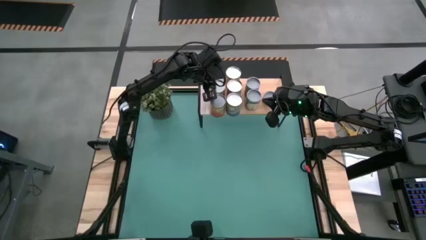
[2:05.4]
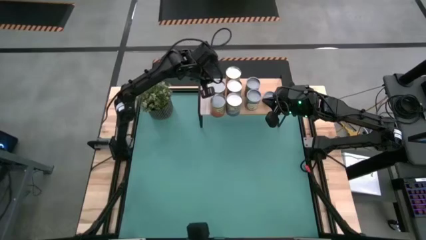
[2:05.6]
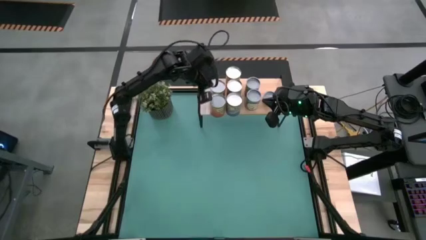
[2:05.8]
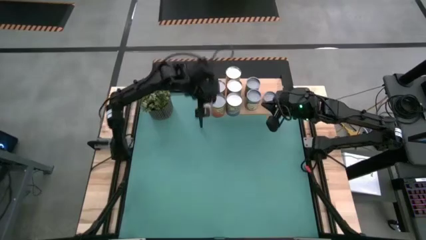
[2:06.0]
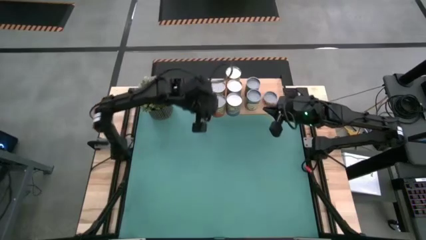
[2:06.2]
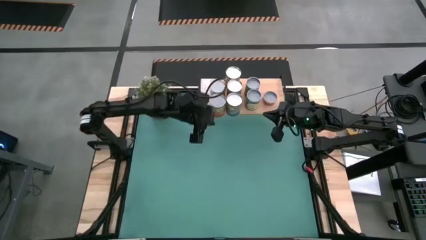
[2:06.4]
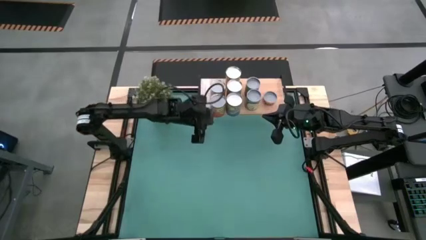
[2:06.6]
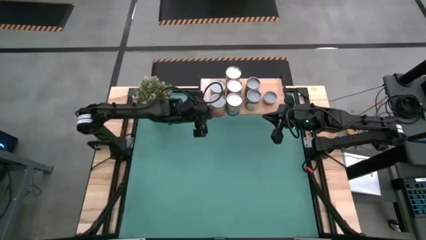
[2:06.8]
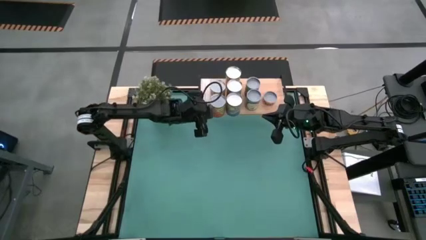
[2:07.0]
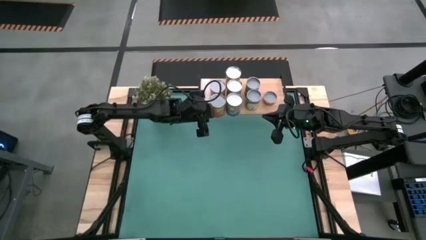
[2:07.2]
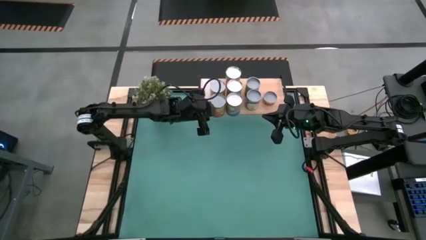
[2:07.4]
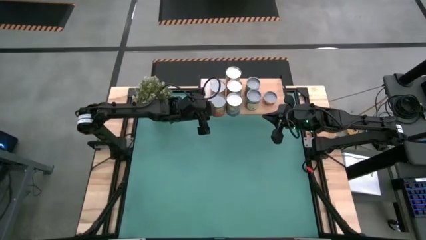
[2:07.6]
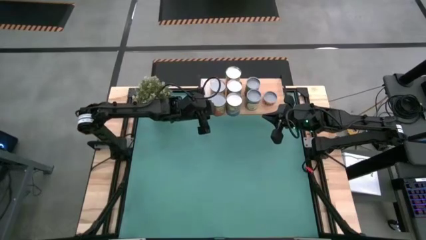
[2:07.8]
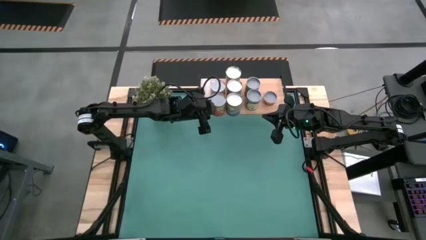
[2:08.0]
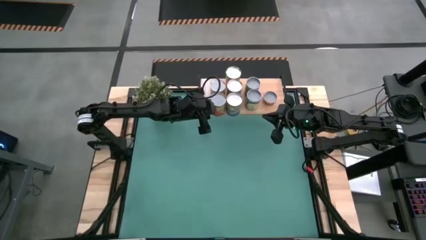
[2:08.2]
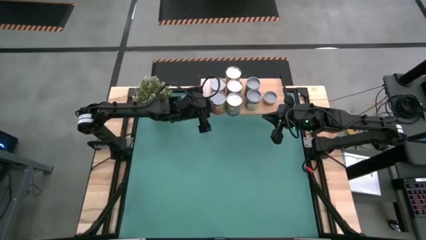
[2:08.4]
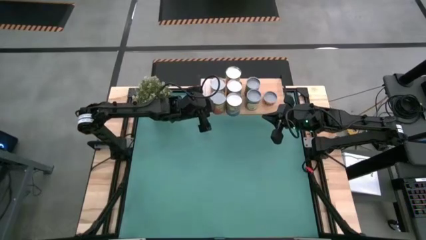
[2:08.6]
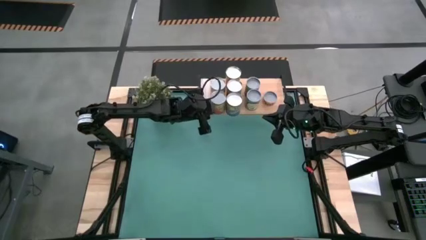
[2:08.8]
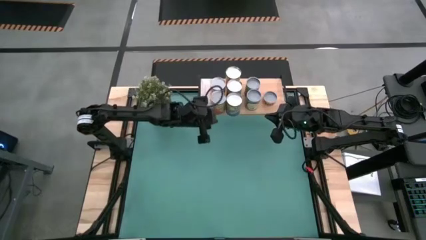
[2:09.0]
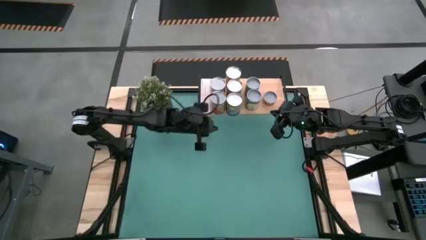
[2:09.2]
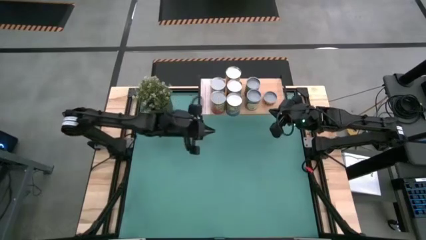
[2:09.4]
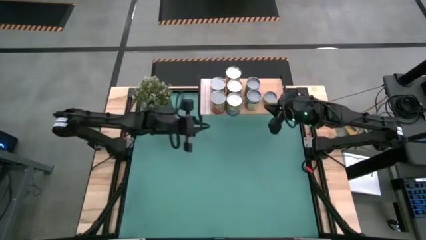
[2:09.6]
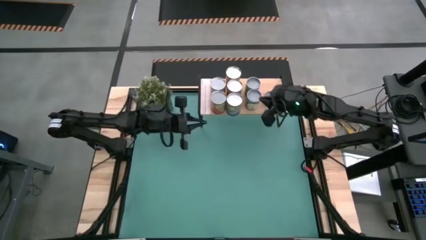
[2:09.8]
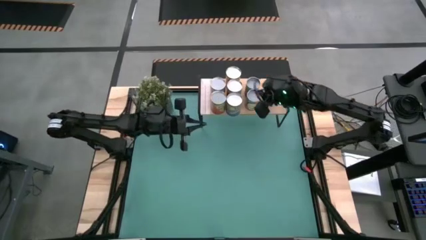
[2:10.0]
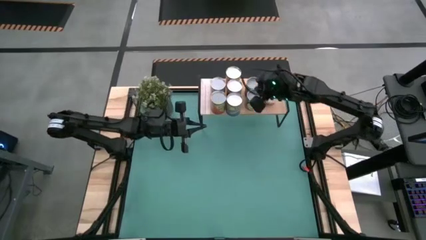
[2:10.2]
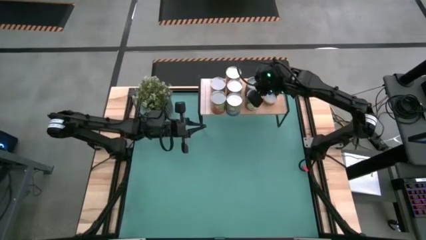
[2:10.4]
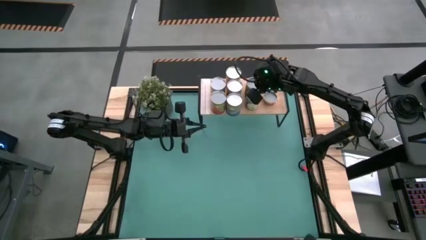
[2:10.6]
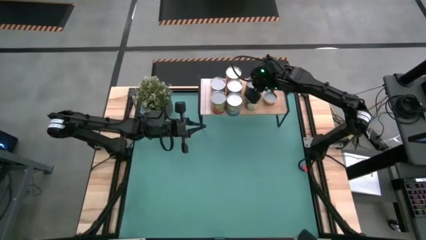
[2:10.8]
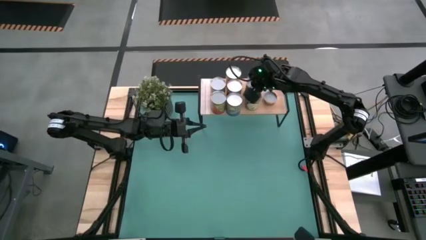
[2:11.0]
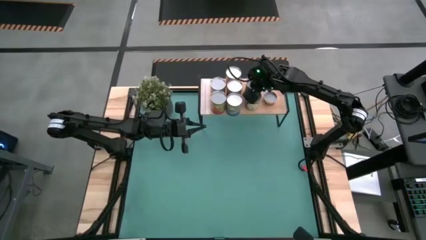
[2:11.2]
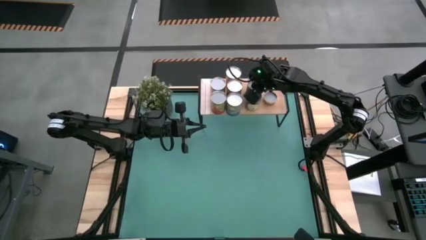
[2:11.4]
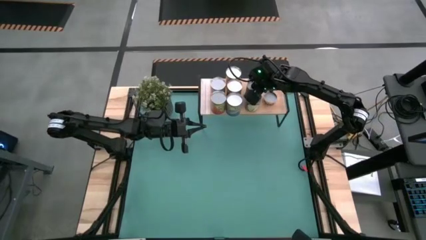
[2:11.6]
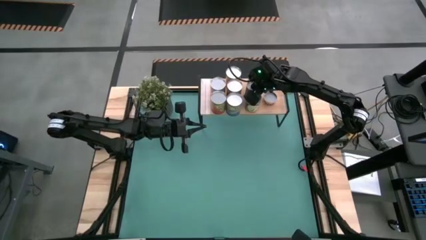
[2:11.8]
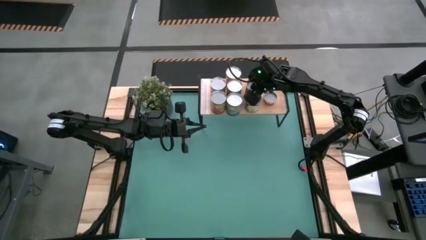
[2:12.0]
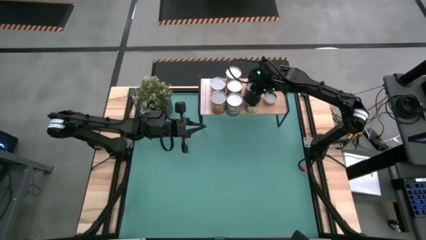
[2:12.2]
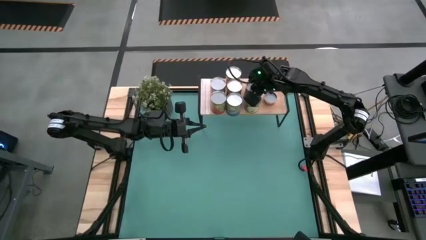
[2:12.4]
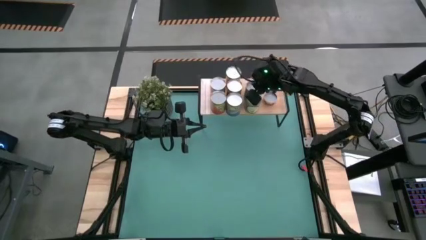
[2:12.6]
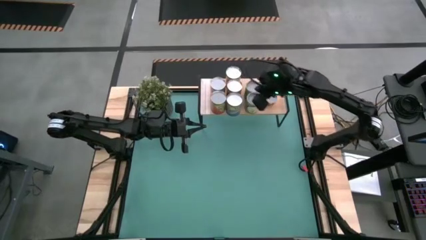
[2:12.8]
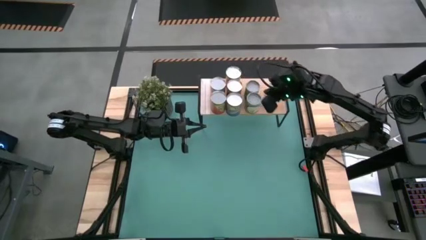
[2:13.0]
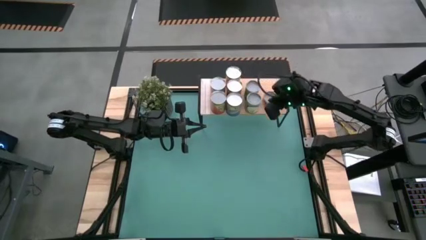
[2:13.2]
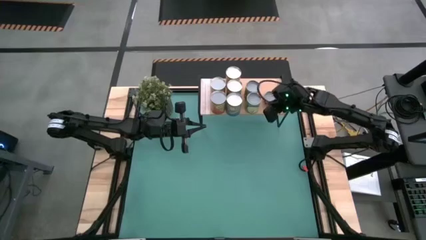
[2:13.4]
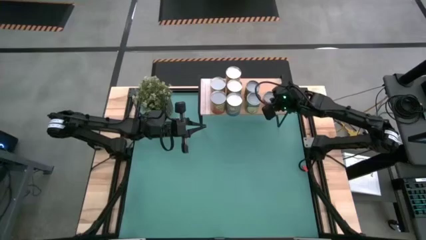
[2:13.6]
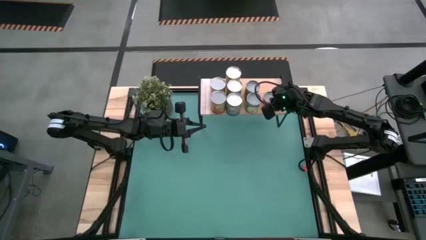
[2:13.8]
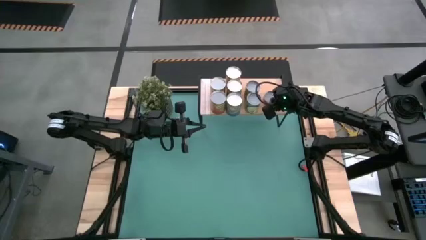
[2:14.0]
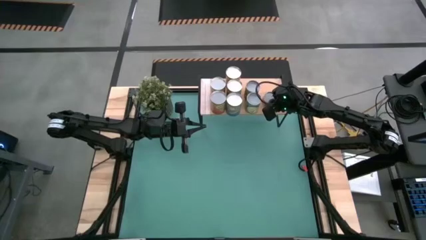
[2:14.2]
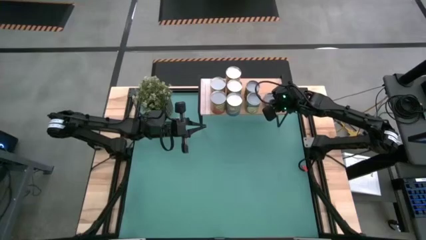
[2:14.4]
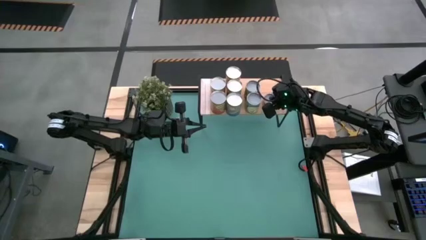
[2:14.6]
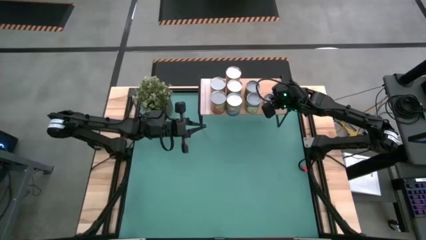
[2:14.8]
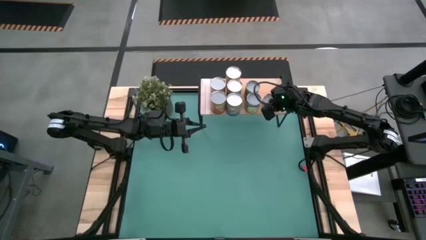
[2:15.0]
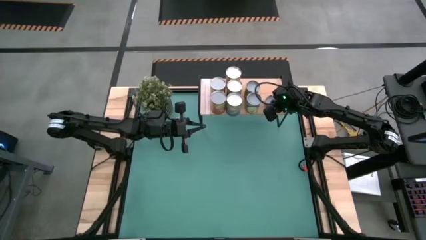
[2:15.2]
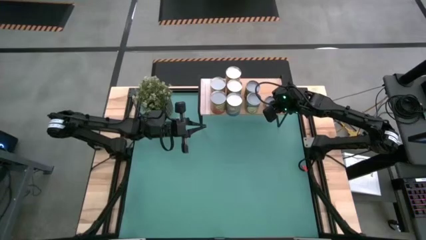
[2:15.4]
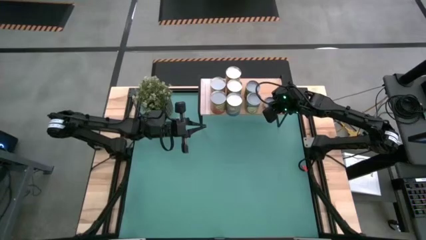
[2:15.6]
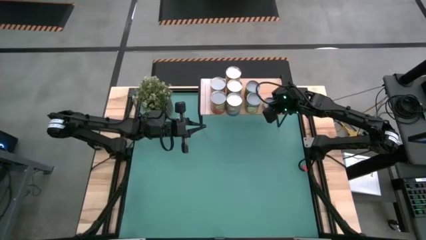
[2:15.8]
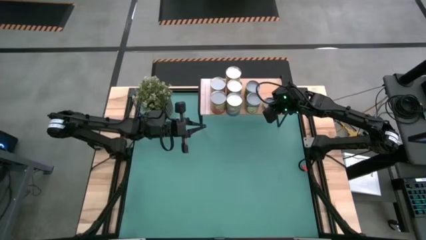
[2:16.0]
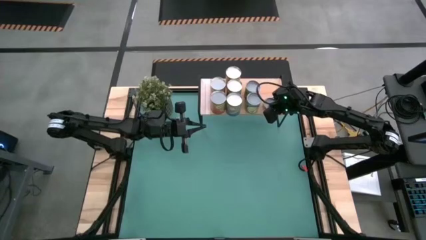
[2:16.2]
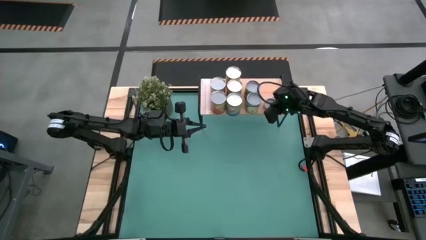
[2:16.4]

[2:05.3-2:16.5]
Task: Pick and place cans onto a shelf
Adjust the canned goods on the shelf

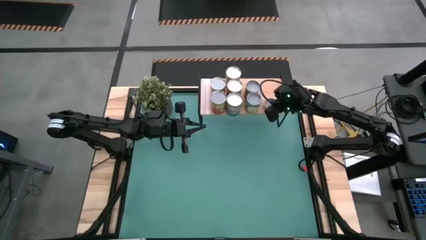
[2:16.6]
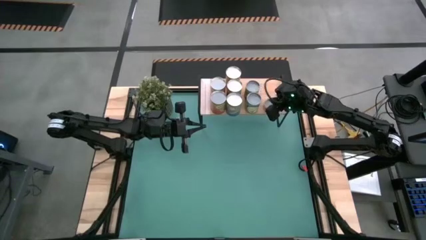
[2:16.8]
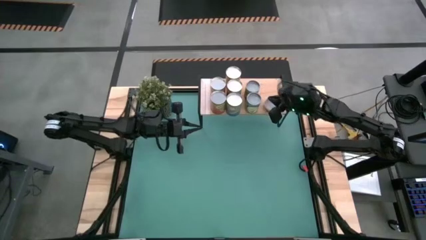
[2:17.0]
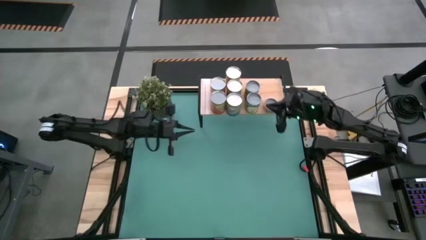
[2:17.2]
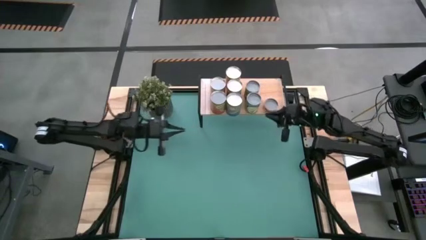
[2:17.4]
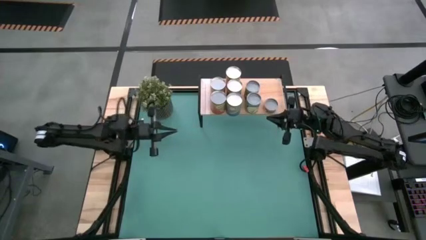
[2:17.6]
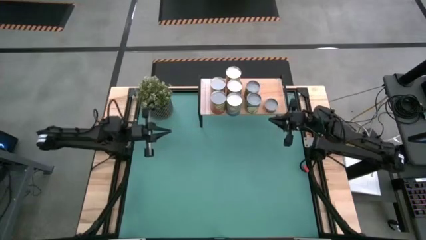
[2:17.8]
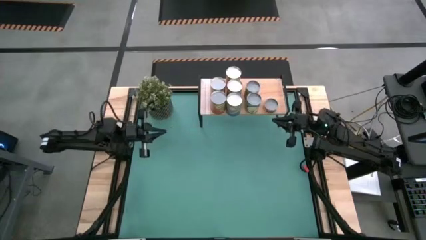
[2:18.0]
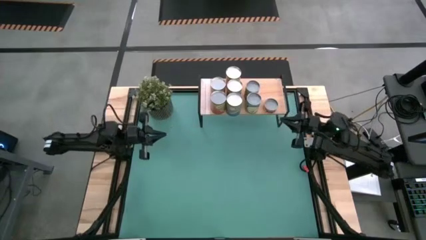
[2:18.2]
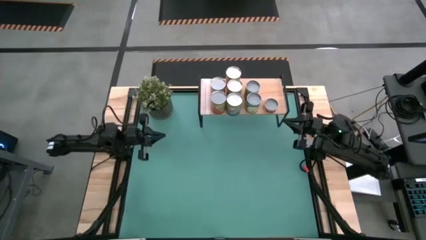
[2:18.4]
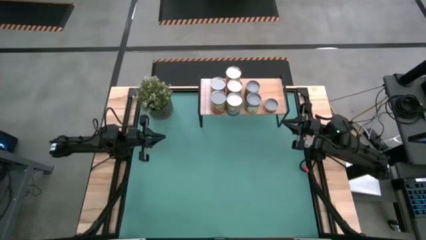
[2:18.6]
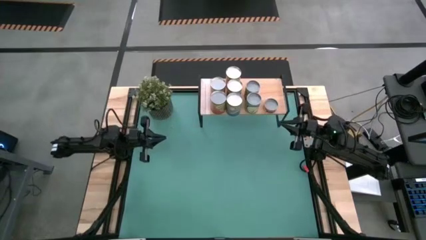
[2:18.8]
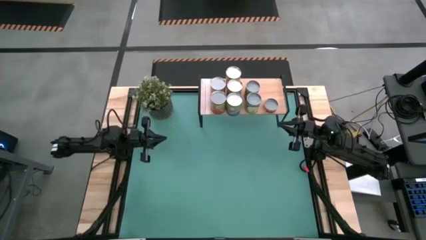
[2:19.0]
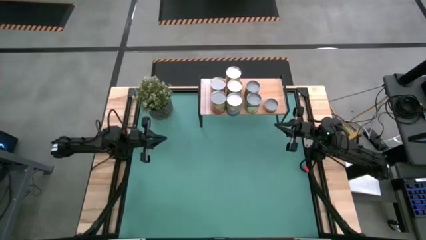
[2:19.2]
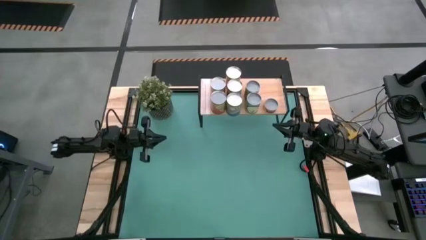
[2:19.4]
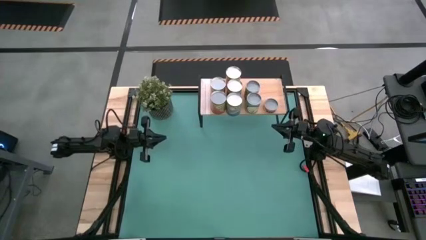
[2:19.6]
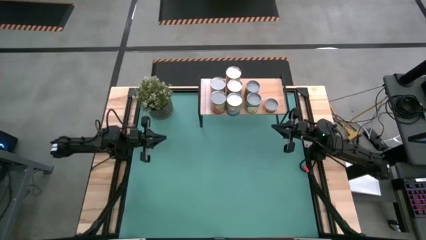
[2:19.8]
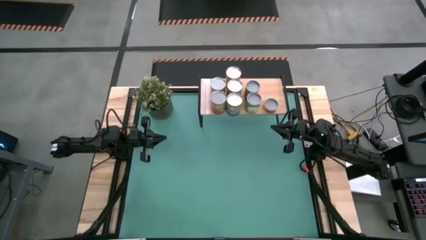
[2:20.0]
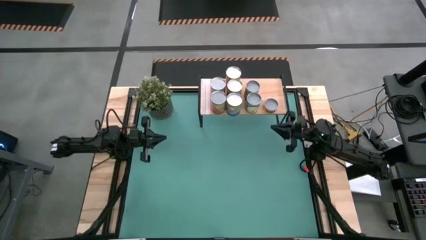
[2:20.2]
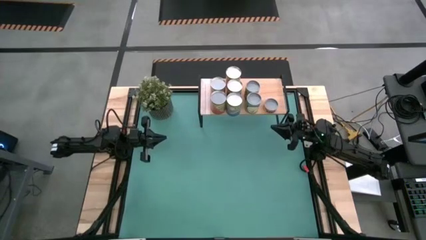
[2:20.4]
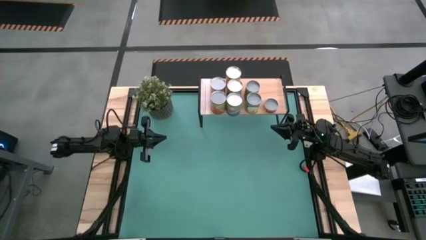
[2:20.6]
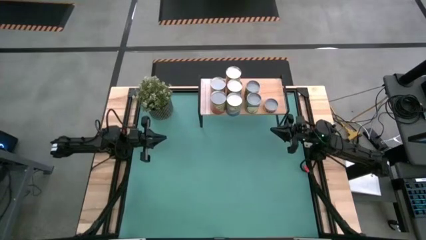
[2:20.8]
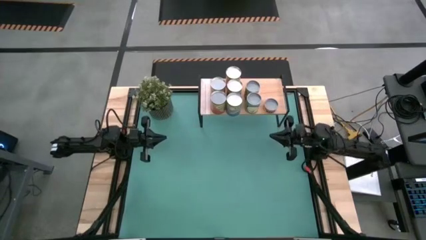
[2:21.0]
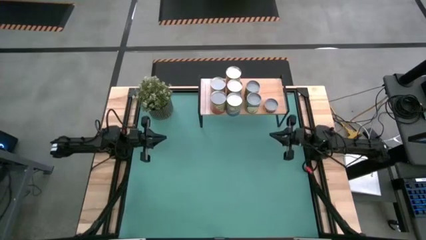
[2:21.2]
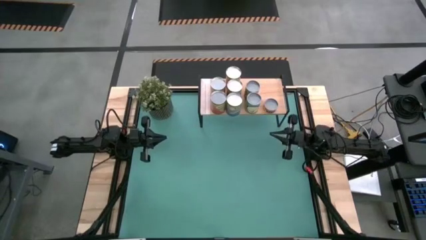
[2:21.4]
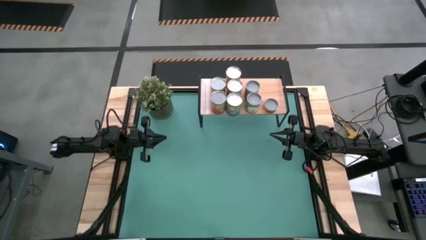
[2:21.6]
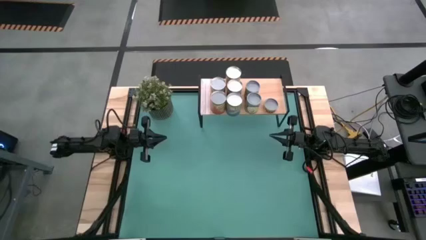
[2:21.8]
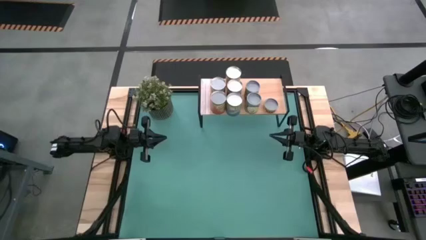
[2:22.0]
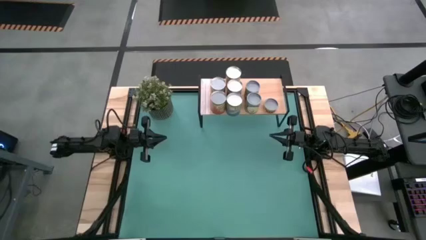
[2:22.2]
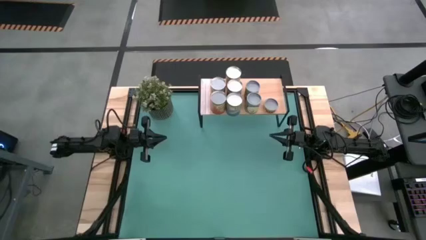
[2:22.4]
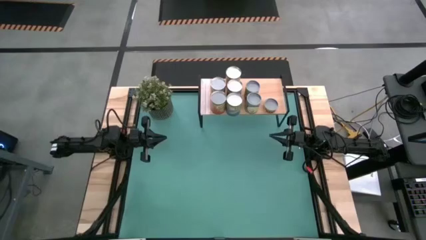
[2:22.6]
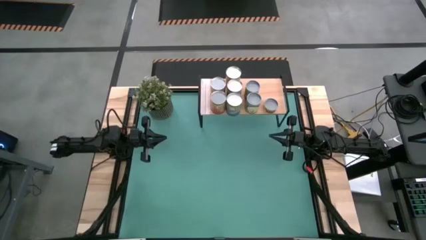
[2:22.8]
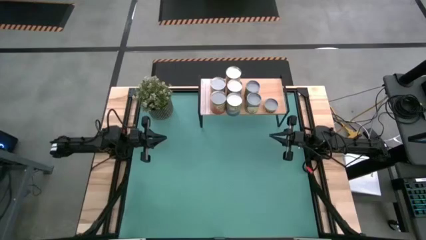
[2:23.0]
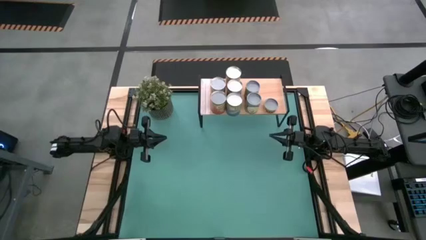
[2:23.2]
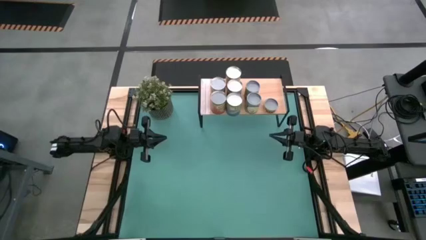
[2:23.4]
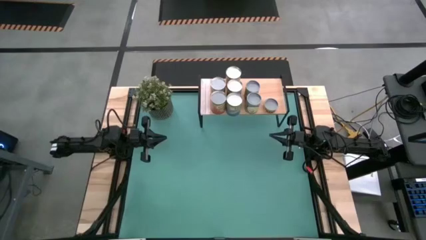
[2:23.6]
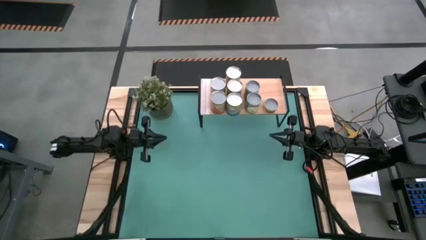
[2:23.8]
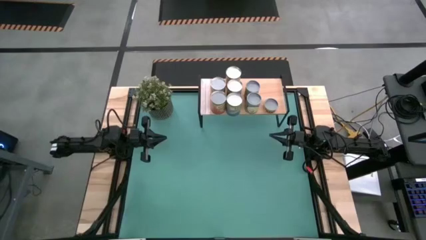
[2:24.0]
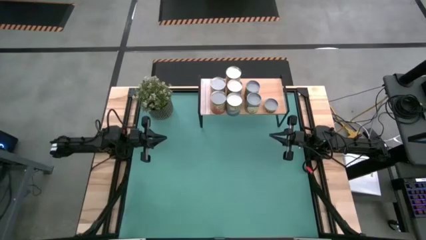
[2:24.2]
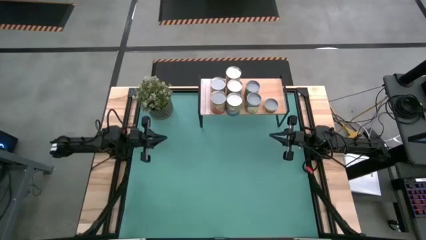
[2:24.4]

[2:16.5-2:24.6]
Return to Home Position
